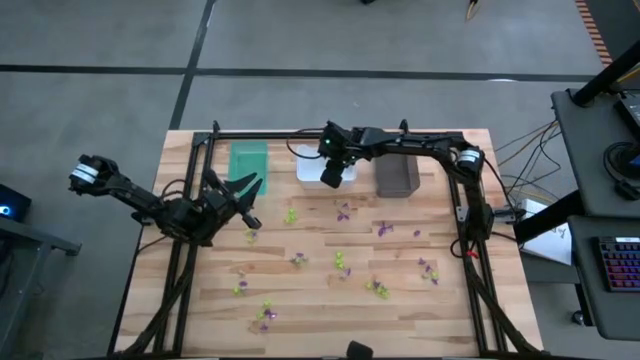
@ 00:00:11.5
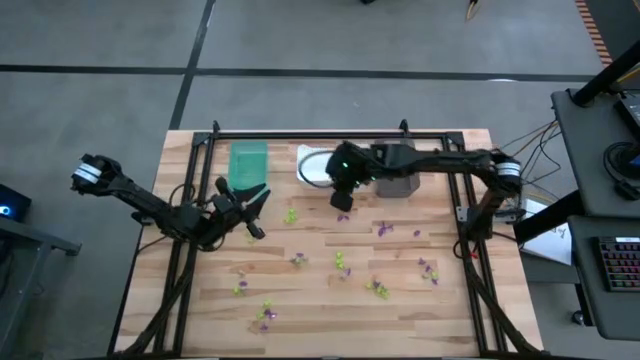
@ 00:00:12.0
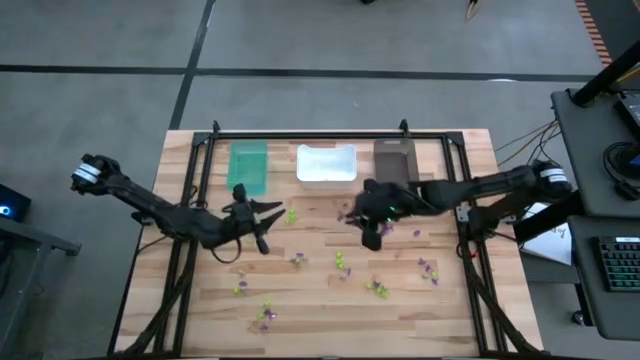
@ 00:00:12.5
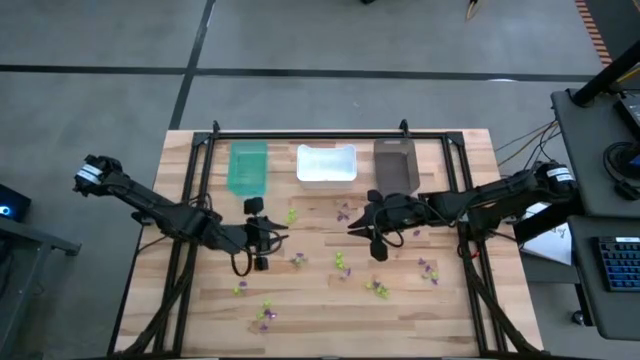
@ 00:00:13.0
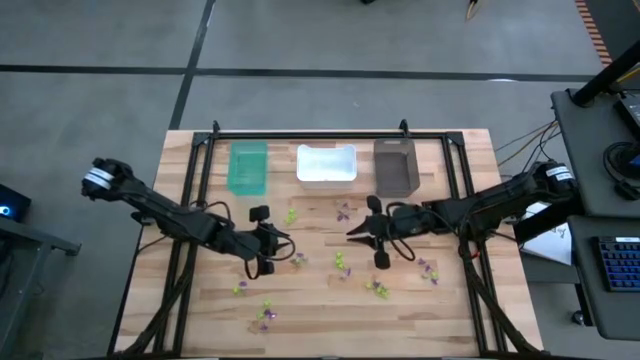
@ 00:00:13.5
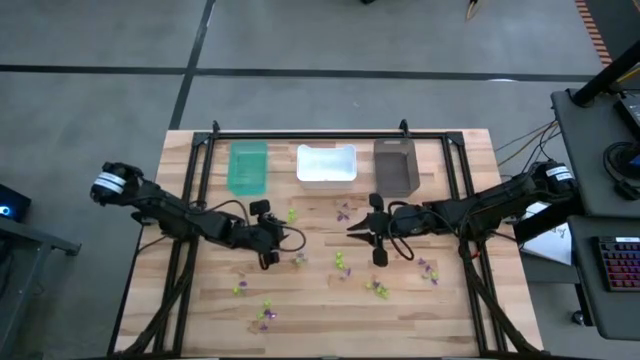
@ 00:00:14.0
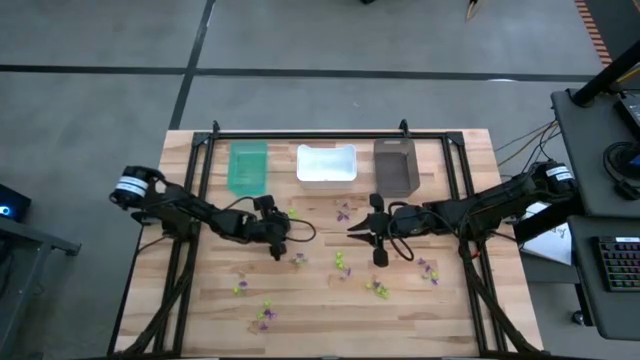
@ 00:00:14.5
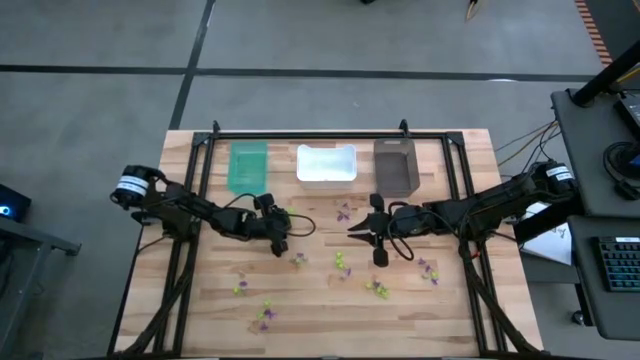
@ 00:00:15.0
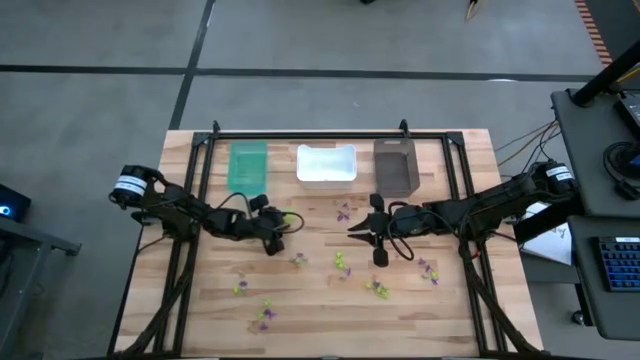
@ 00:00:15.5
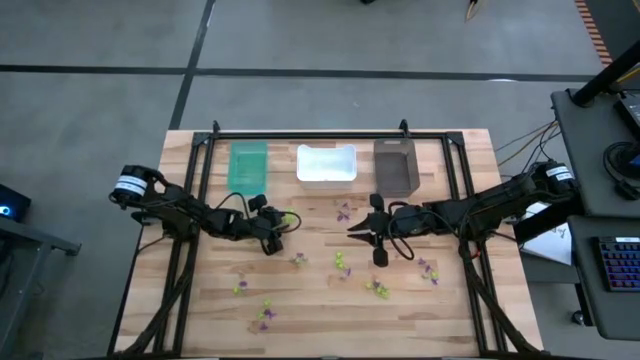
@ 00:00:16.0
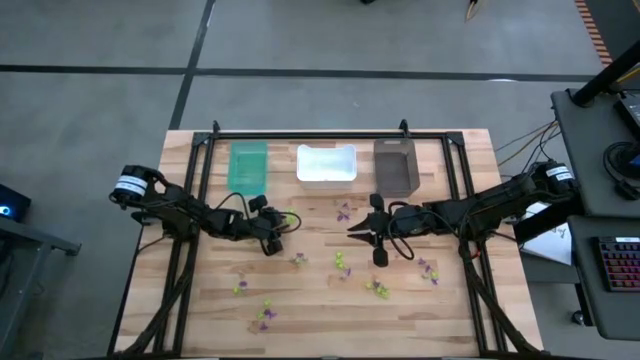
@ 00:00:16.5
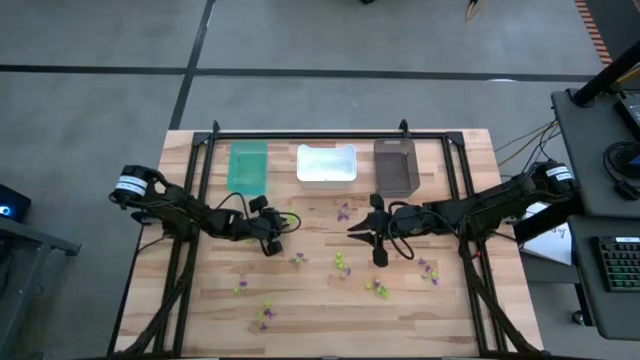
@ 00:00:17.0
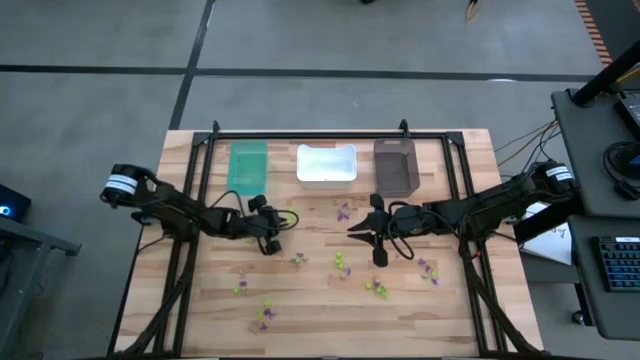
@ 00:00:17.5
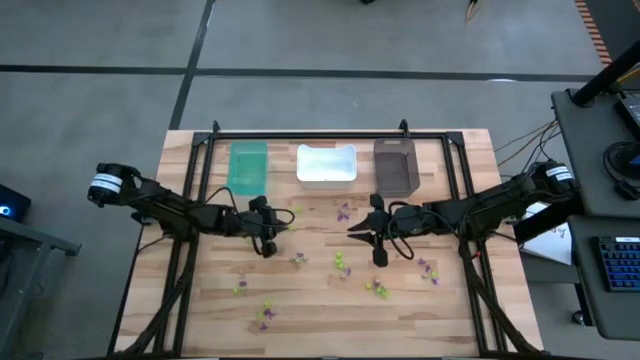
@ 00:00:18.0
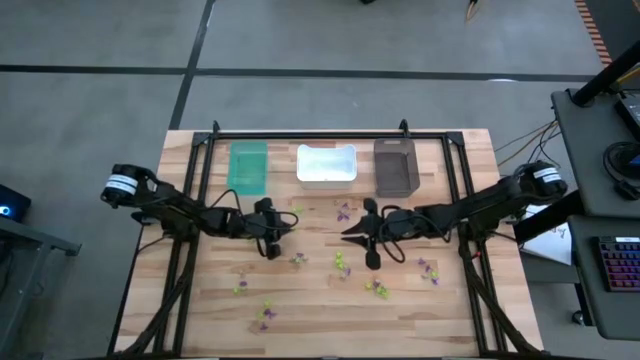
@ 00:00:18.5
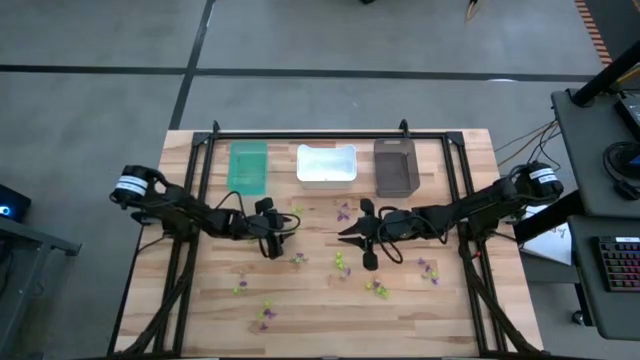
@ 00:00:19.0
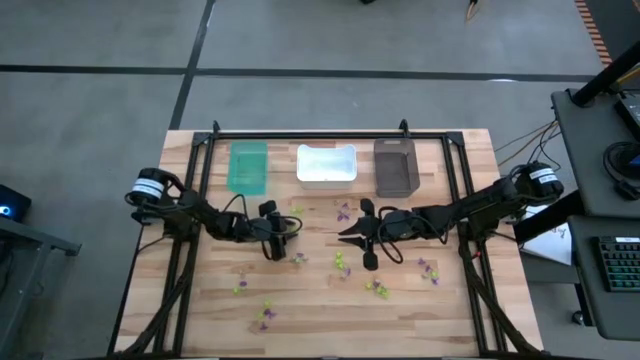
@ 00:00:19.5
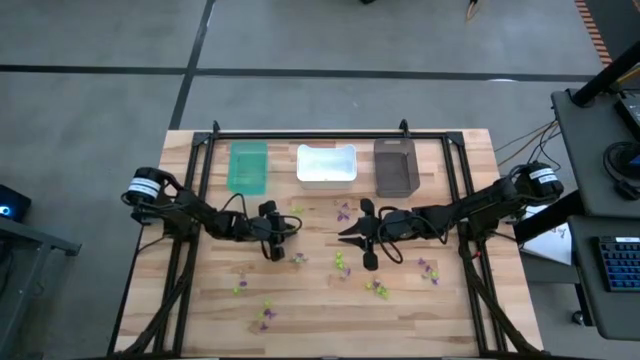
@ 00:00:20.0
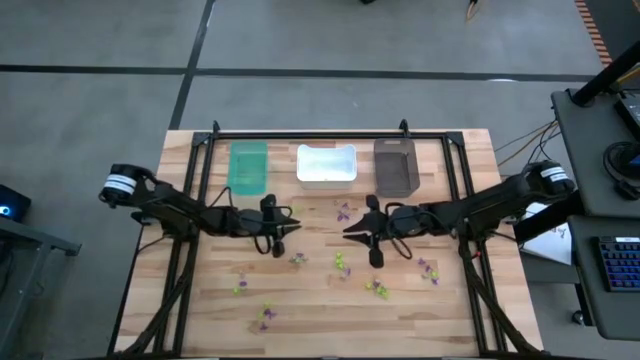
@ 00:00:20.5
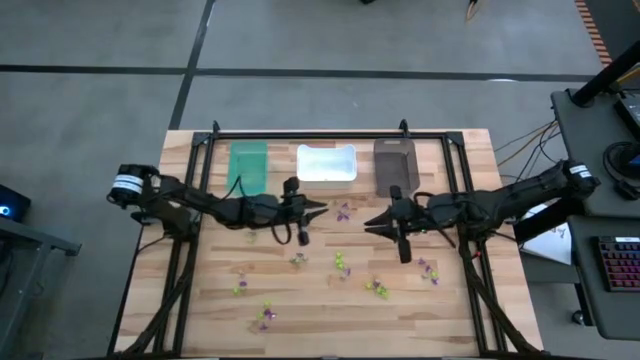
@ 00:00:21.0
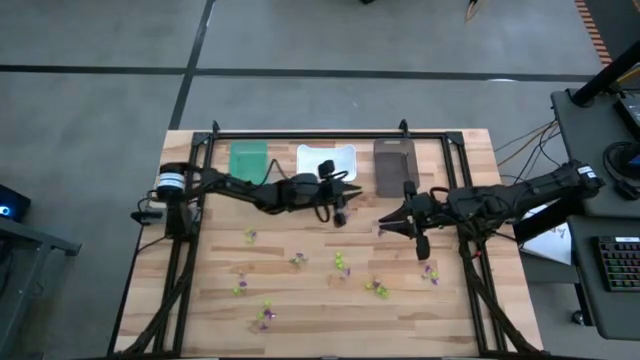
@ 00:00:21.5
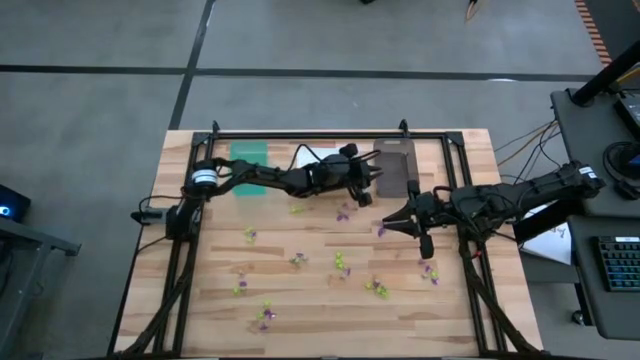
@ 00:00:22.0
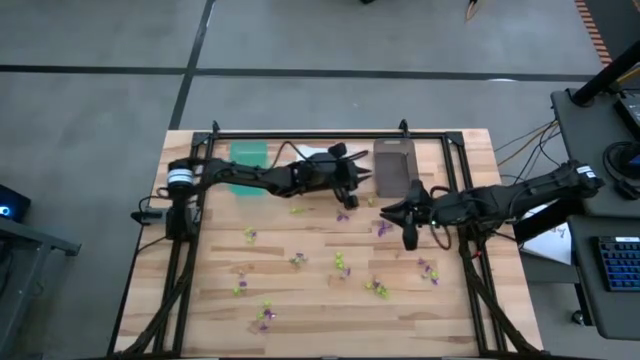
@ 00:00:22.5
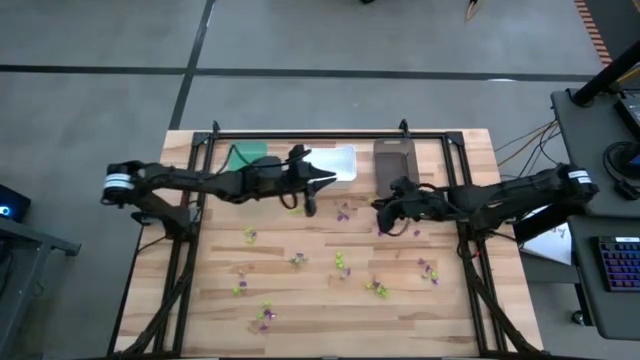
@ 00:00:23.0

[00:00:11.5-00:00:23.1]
Task: Sort Halloween decoration
Put the green spider toy into the black bin

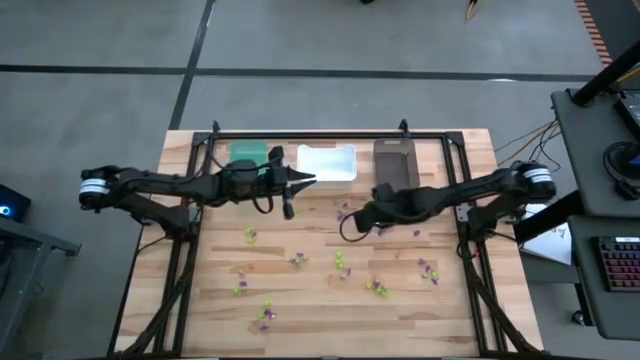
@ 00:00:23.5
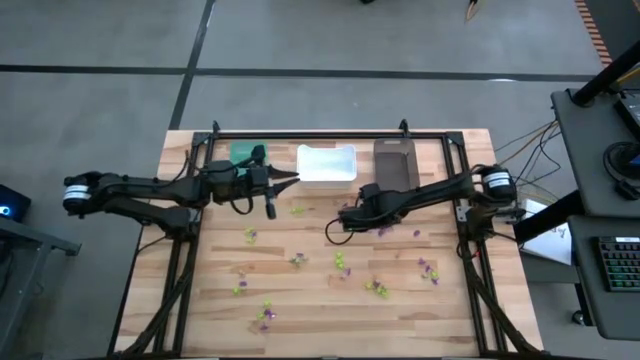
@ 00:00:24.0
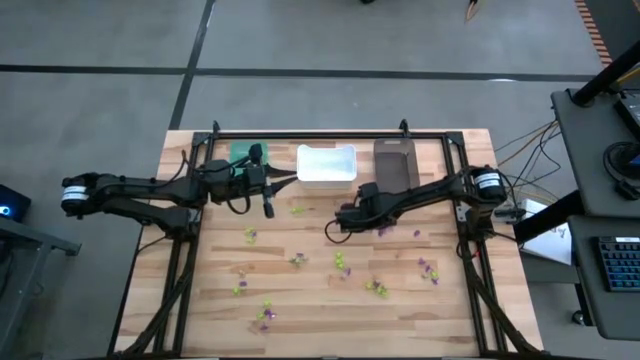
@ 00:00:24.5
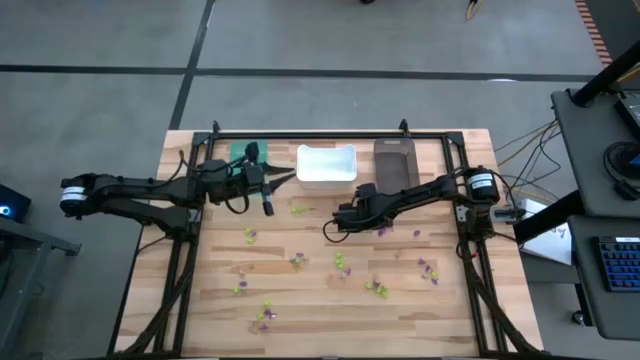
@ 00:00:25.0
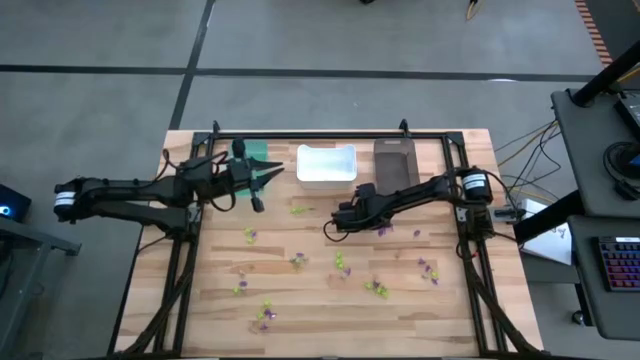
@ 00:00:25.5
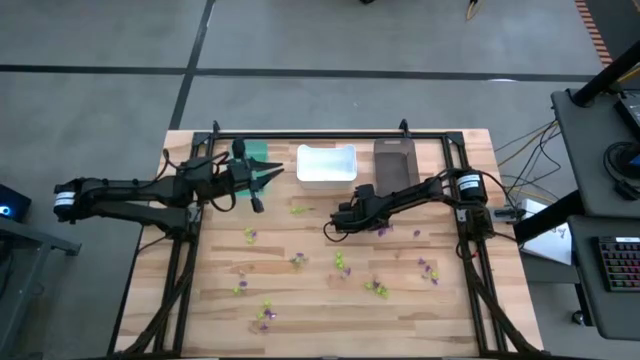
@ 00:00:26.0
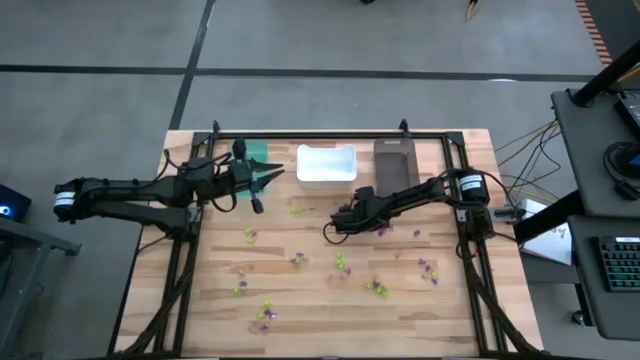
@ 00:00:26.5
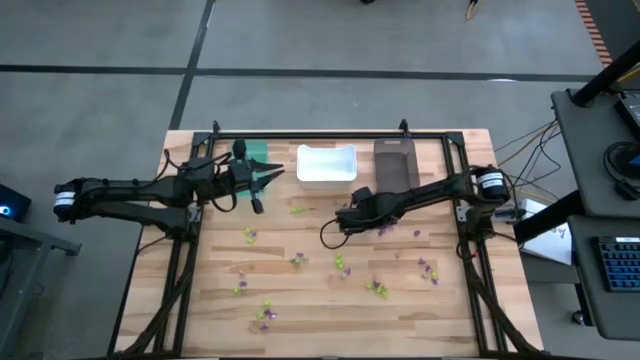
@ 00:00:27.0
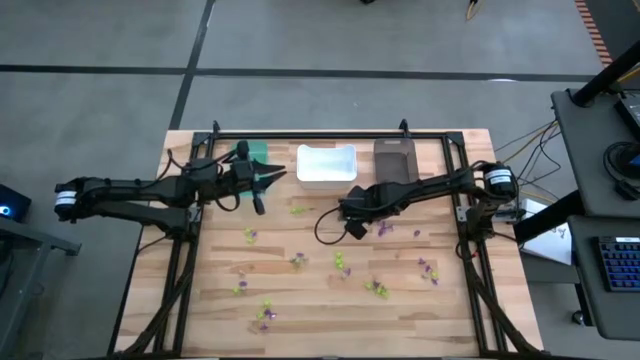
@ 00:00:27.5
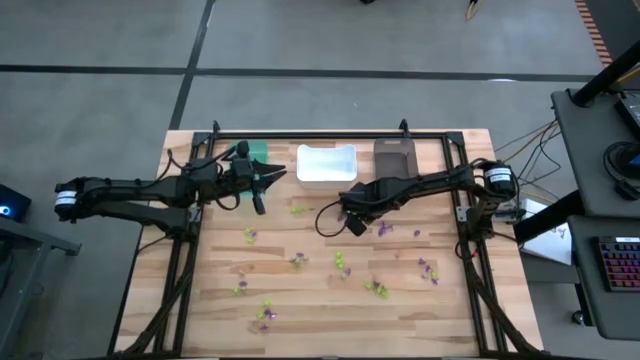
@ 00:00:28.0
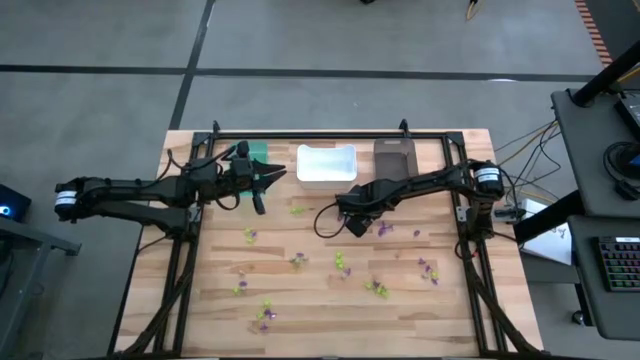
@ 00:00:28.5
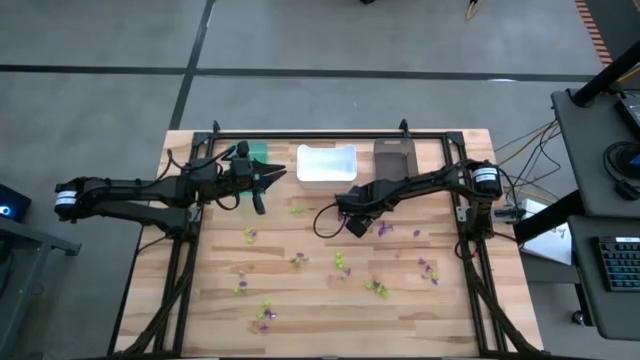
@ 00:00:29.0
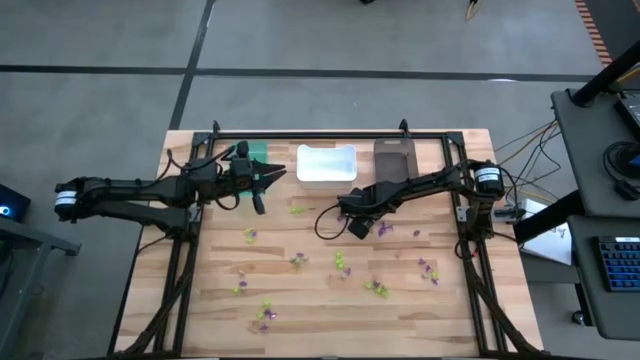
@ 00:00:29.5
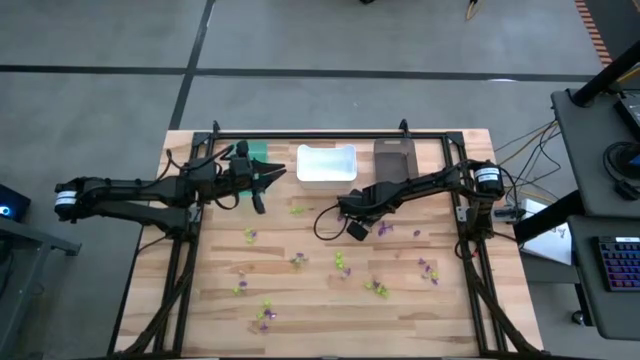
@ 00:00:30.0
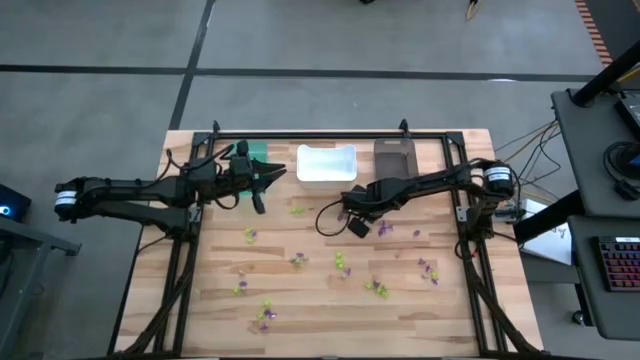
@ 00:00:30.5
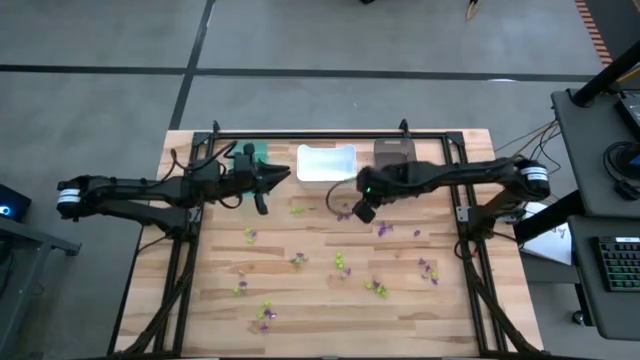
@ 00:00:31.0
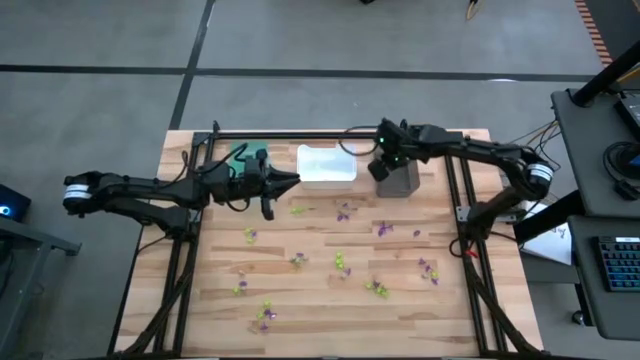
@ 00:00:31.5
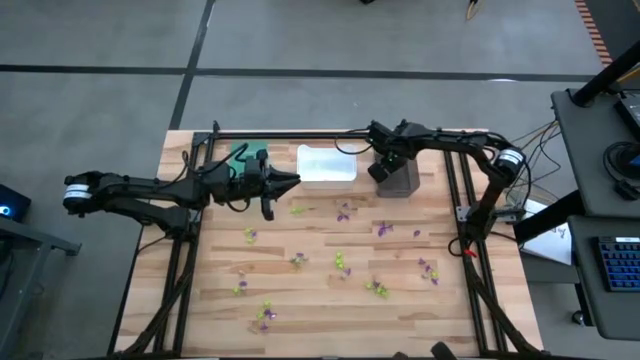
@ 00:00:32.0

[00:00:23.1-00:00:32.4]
Put the green spider toy into the black bin
